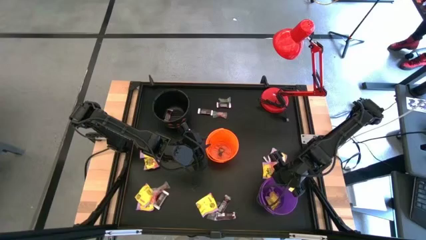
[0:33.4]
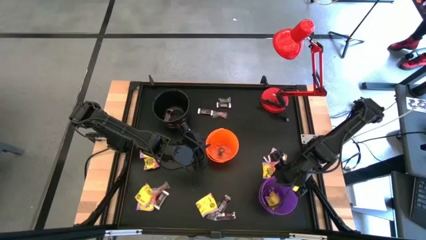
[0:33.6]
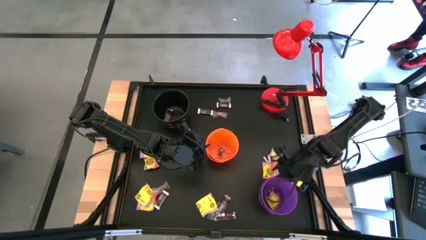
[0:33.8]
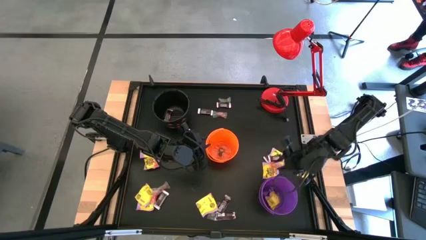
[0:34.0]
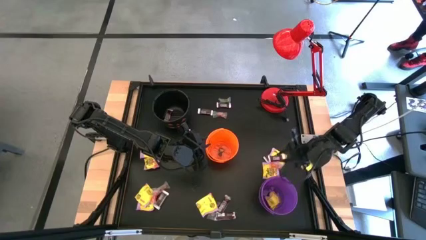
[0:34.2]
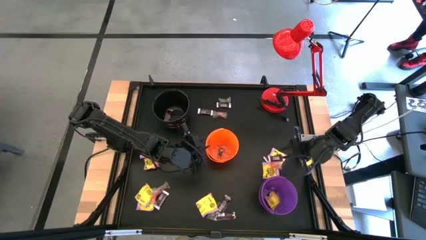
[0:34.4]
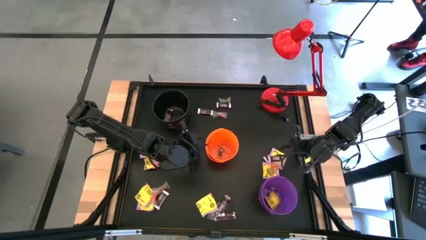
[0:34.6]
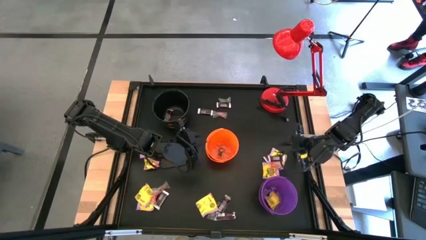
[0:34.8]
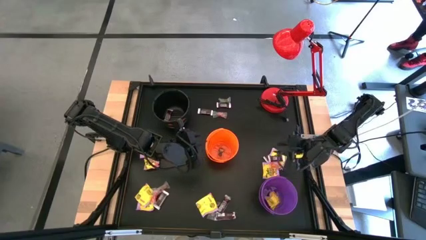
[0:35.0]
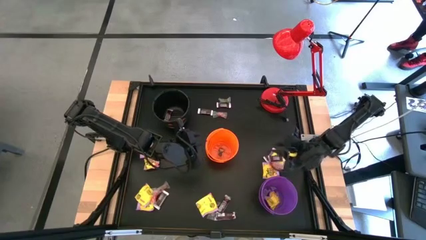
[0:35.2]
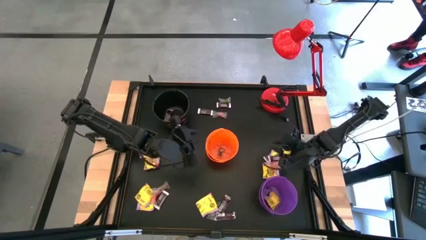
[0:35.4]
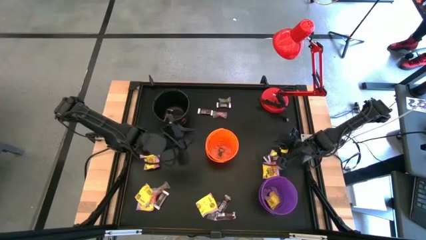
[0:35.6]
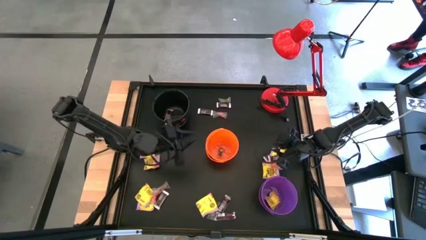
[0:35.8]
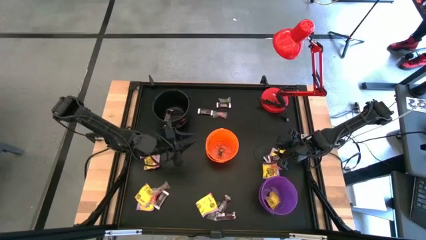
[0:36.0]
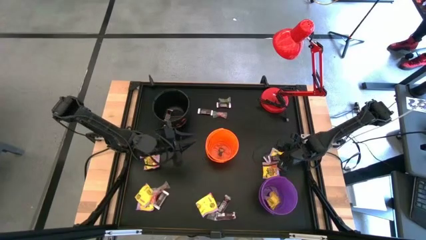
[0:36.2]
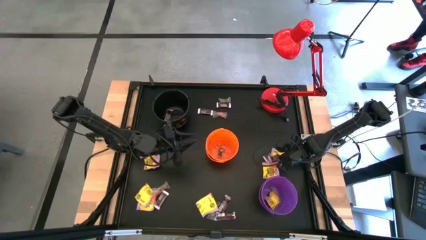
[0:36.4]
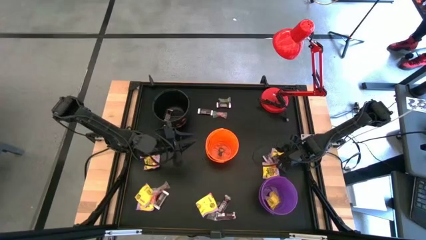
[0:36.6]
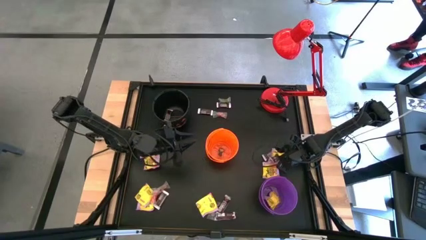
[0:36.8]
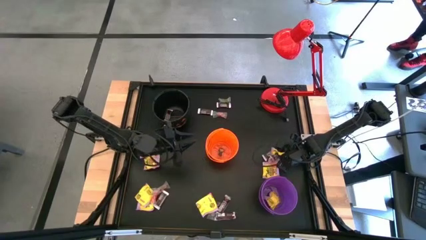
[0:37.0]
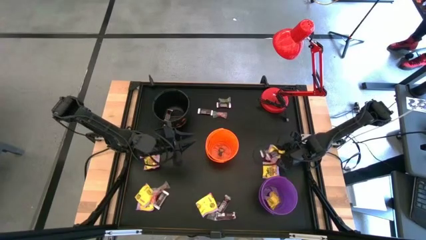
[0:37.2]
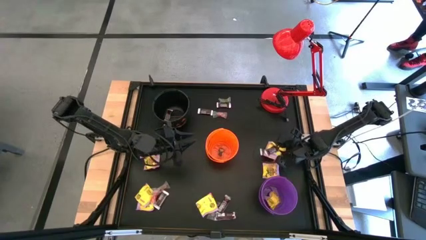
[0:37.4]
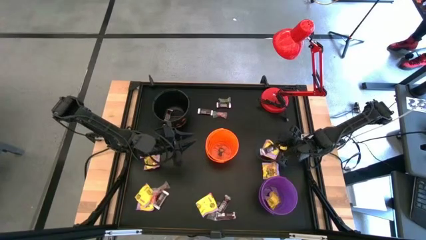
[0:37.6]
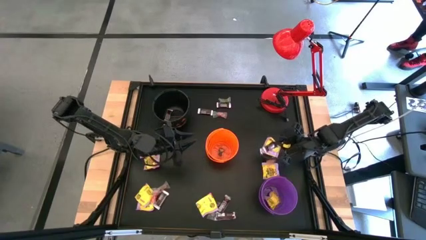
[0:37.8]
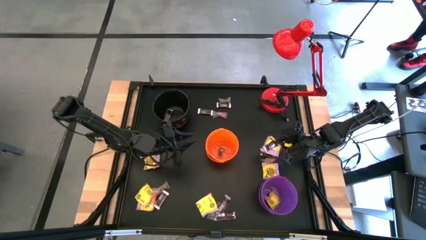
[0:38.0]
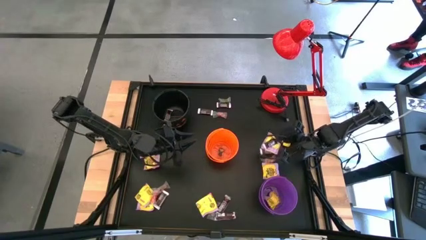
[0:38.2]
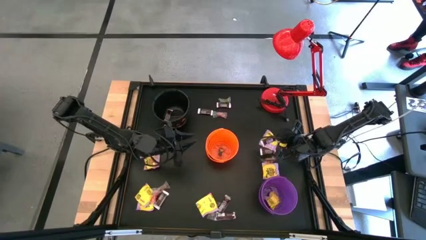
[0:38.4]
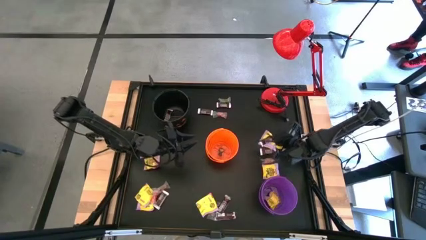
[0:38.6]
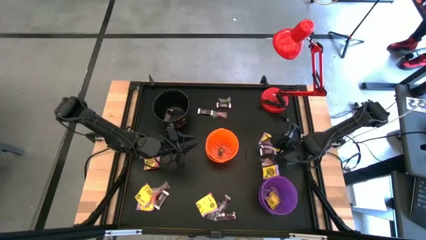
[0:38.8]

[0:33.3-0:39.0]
Task: Sort candy
Put the brown chocolate bar into the black bucket

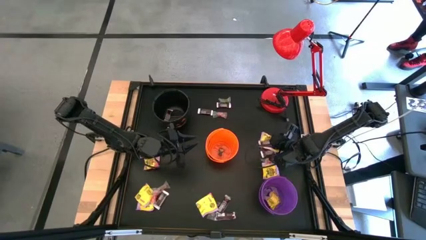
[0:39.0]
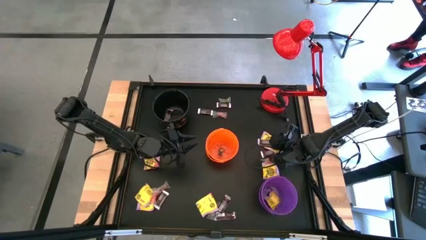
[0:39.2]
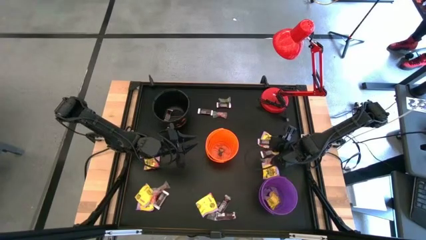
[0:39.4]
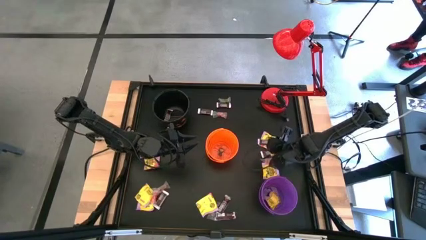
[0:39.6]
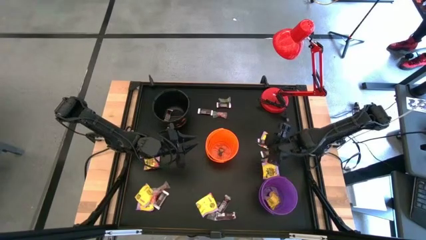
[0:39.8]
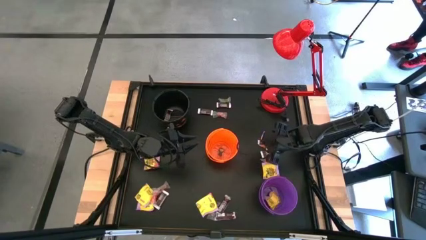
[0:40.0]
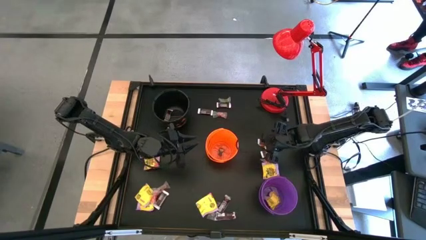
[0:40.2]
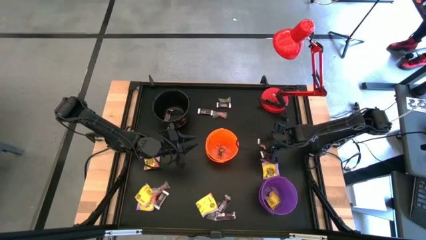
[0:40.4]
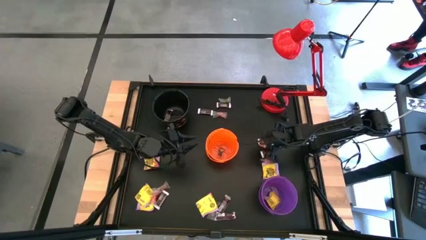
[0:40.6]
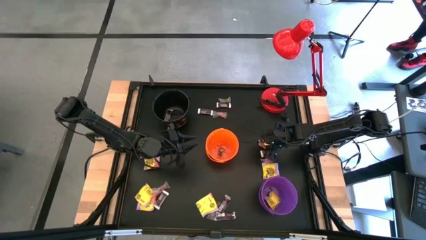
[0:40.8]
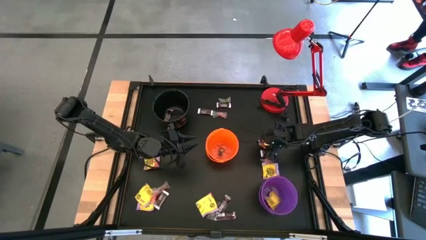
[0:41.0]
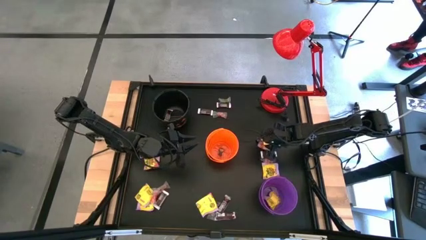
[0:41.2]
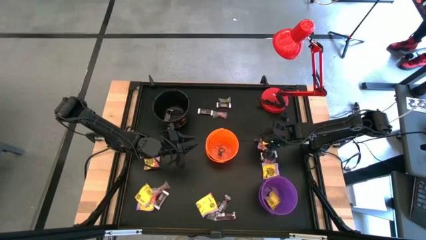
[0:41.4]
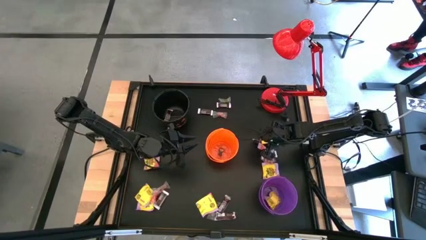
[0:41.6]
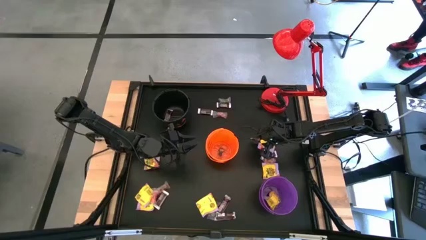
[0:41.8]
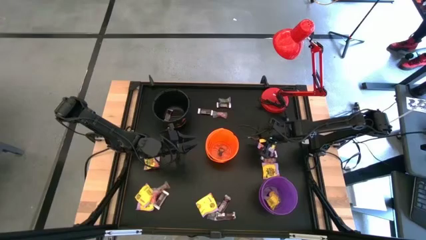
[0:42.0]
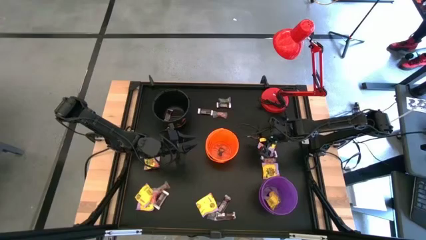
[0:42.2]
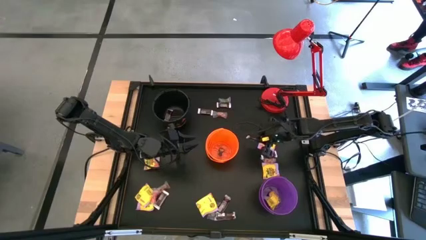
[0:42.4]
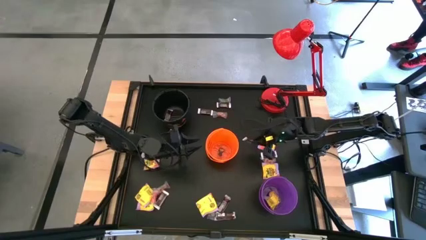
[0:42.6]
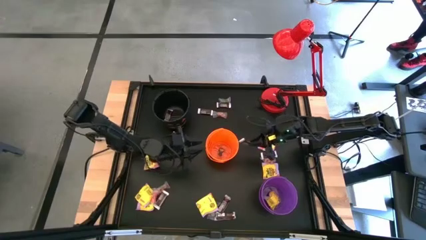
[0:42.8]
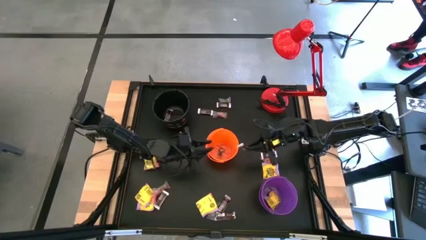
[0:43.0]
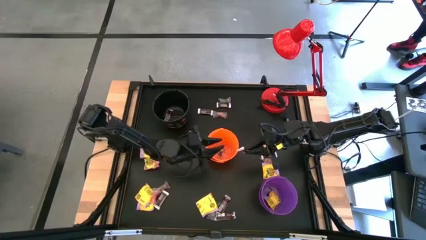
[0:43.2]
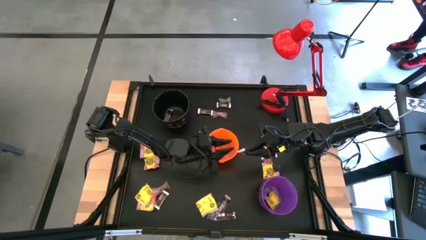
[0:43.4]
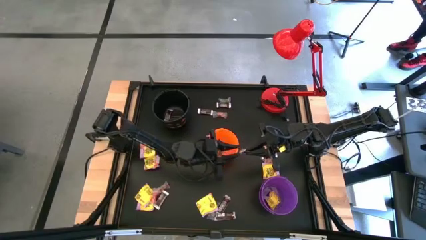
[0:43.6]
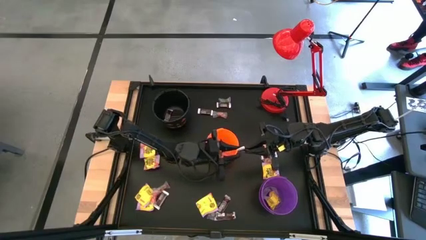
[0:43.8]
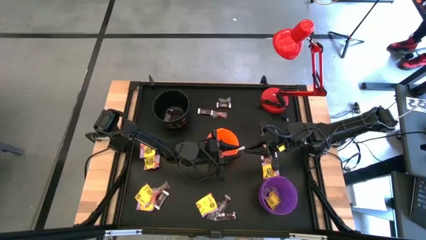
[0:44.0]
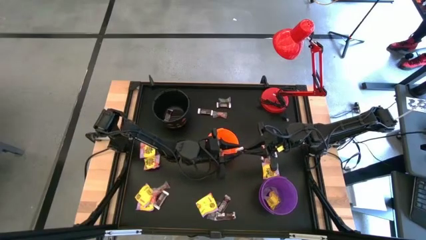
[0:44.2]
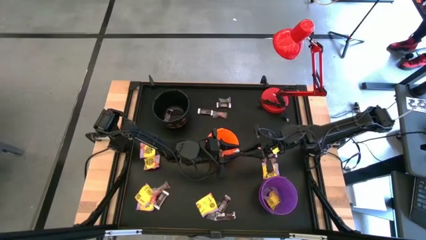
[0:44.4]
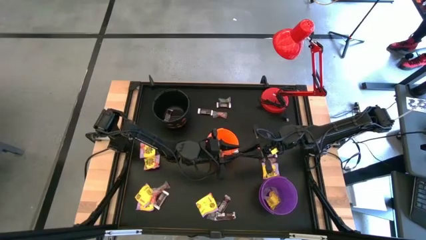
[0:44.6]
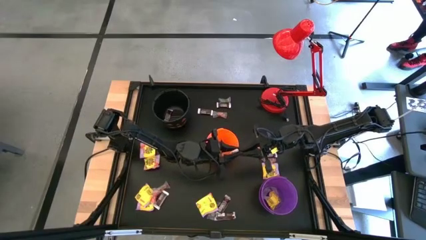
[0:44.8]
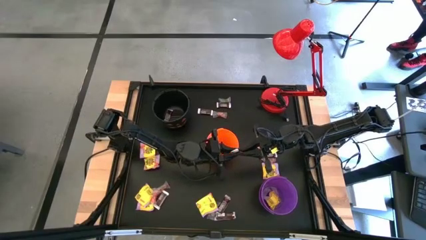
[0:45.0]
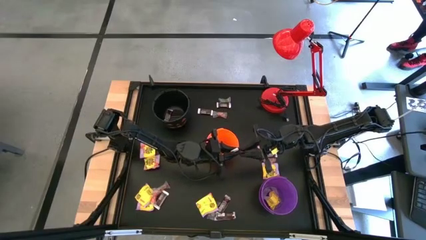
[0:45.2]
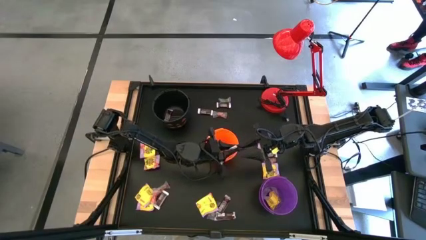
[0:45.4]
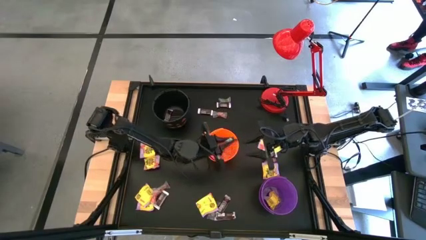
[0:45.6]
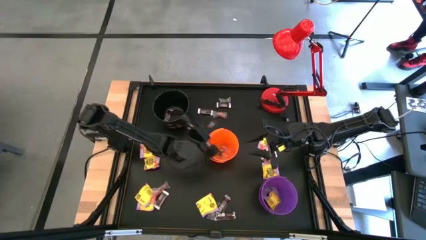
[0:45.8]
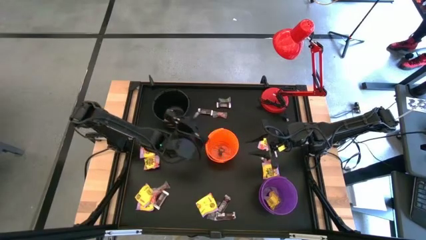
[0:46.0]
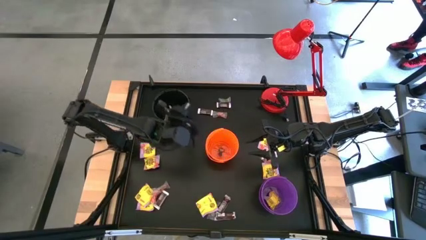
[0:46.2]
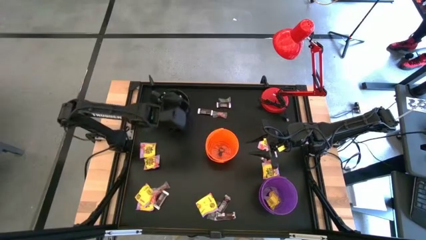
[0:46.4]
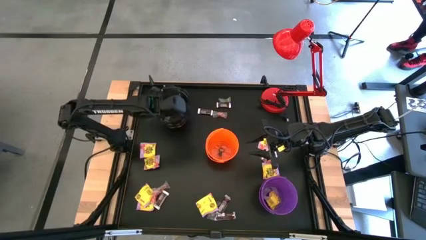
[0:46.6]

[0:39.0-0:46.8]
Put the brown chocolate bar into the black bucket

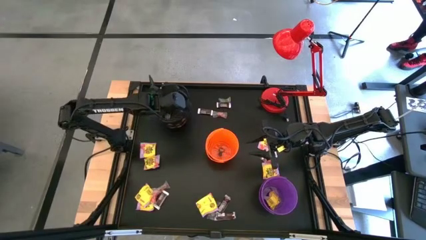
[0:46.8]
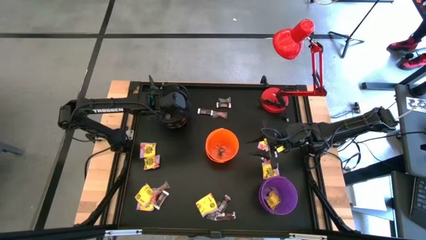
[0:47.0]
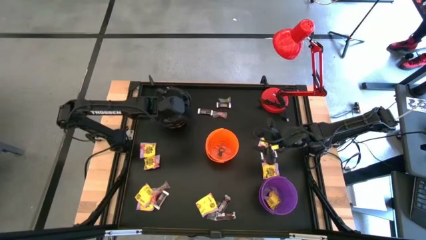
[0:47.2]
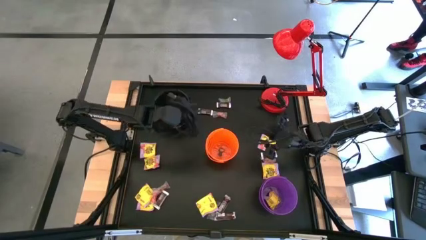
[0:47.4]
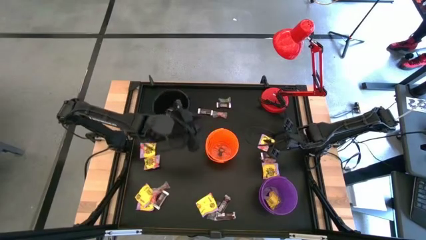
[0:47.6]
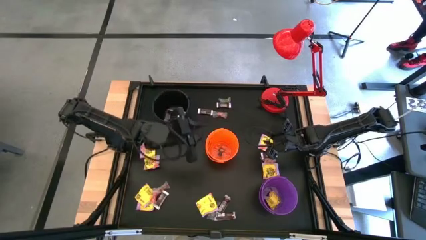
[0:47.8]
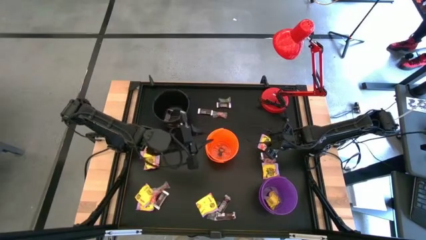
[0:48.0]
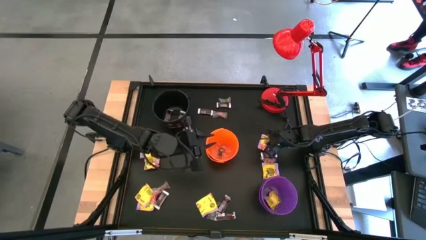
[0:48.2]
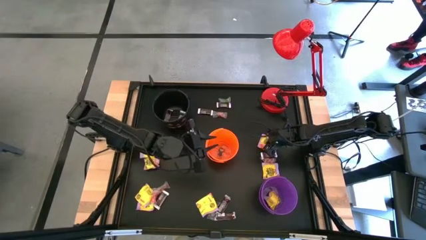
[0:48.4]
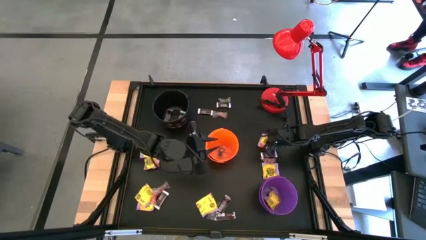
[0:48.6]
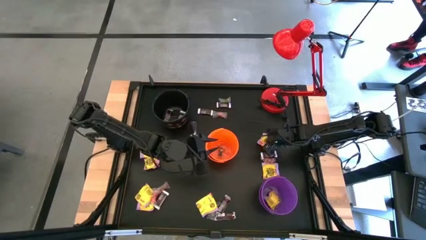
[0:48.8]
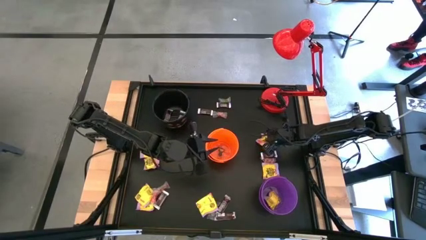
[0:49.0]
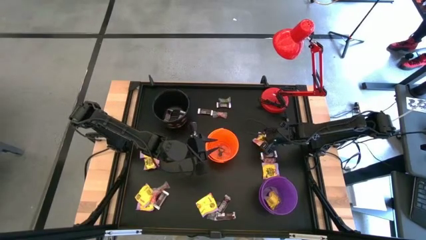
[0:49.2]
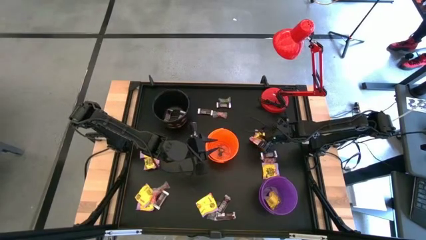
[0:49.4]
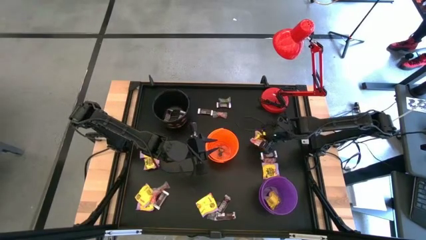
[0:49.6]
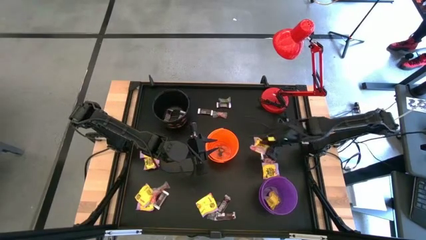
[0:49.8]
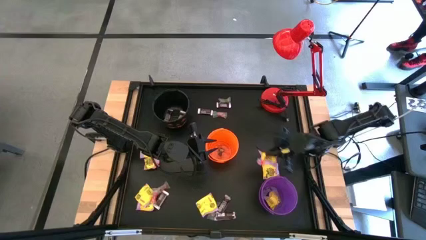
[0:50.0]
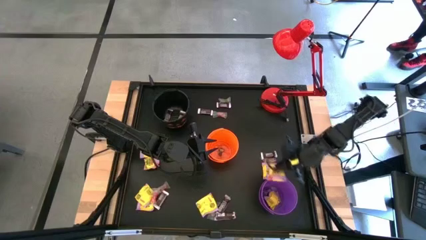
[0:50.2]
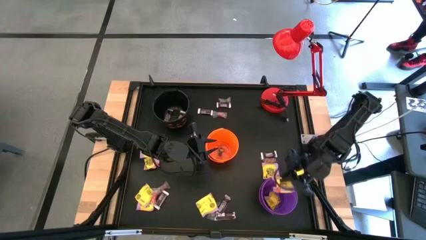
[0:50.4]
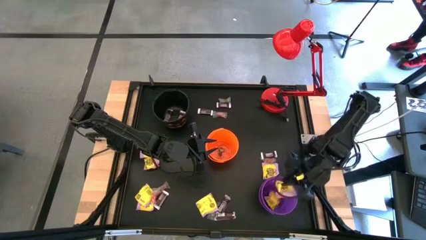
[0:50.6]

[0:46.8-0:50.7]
Put the yellow candy into the purple bucket
